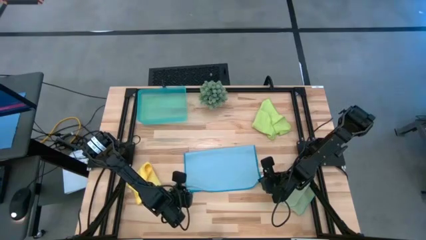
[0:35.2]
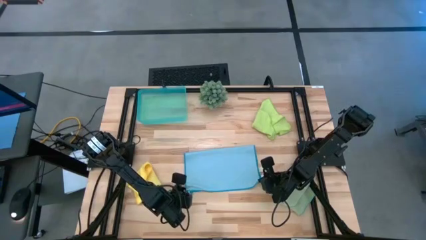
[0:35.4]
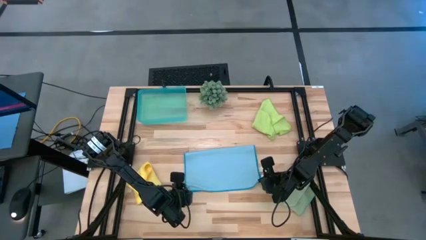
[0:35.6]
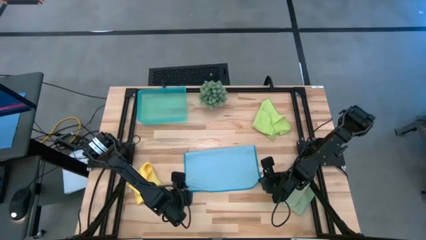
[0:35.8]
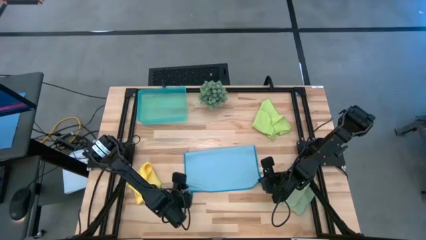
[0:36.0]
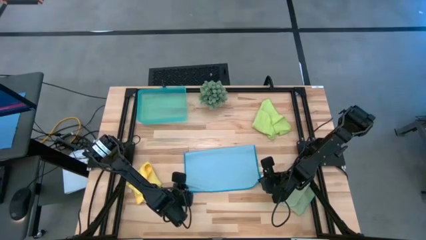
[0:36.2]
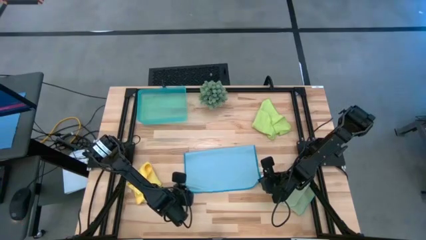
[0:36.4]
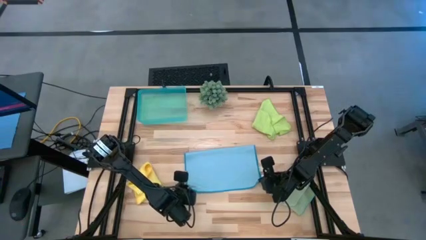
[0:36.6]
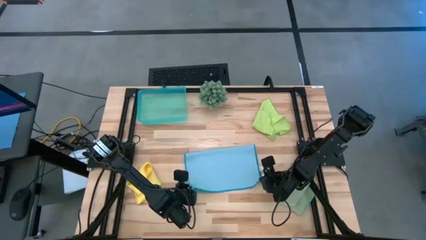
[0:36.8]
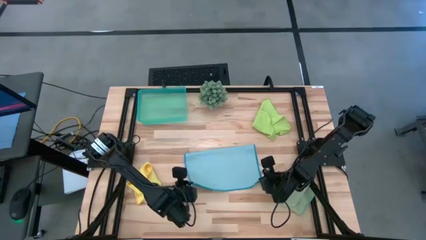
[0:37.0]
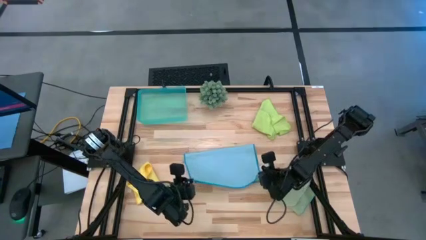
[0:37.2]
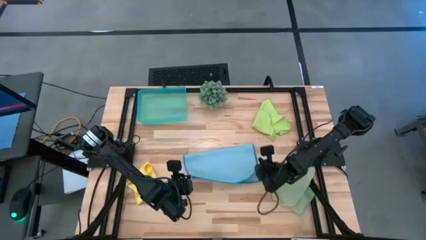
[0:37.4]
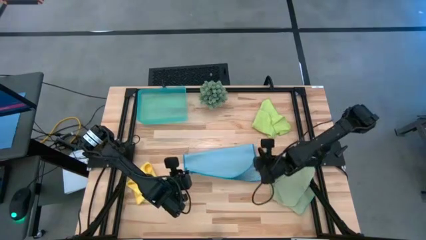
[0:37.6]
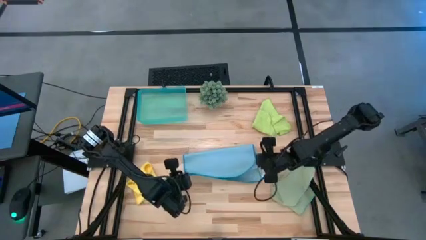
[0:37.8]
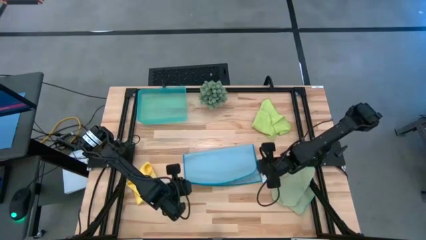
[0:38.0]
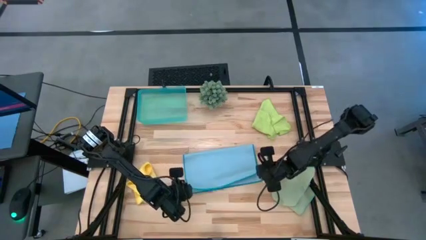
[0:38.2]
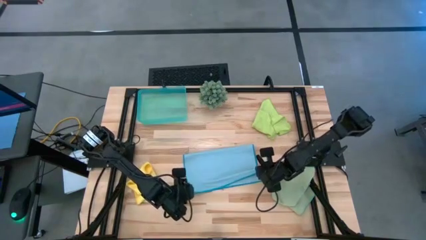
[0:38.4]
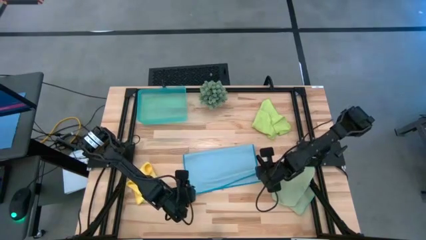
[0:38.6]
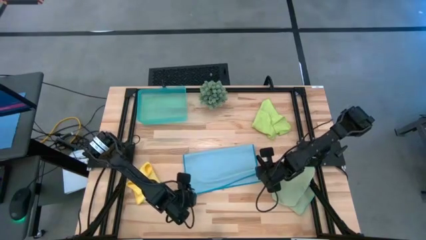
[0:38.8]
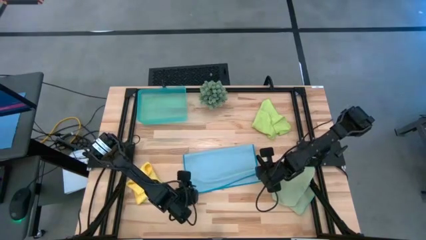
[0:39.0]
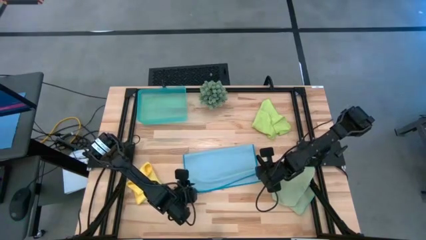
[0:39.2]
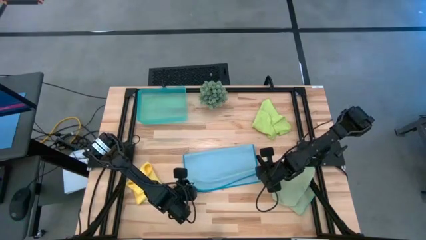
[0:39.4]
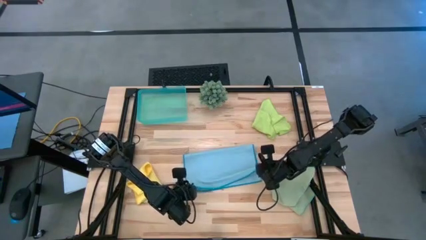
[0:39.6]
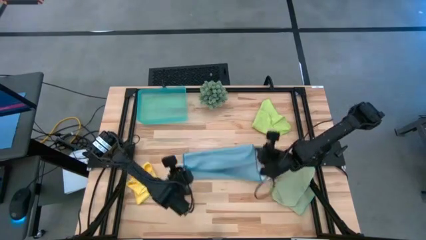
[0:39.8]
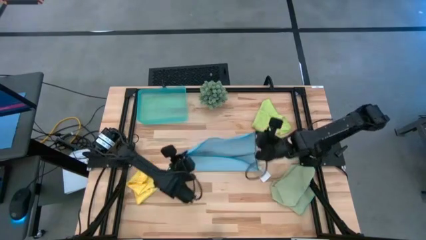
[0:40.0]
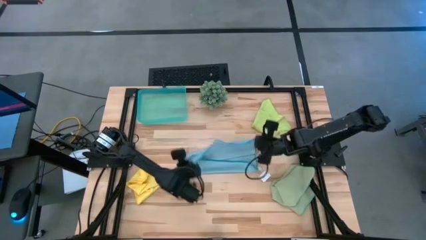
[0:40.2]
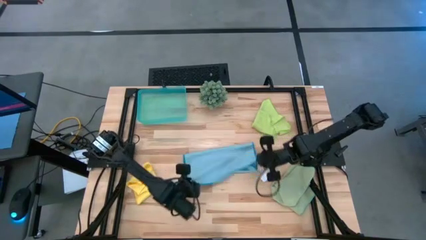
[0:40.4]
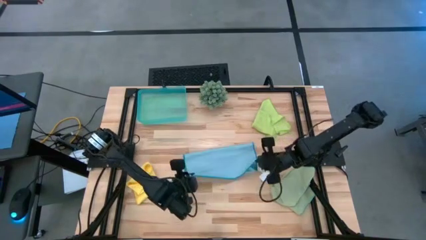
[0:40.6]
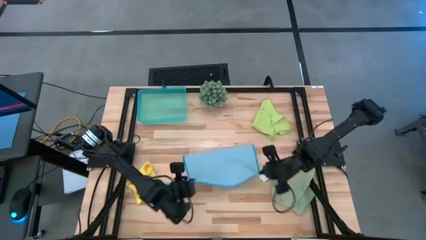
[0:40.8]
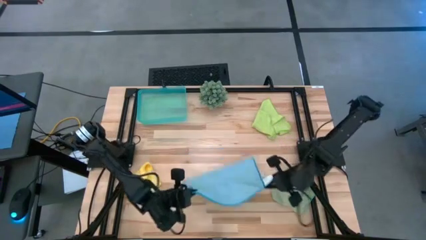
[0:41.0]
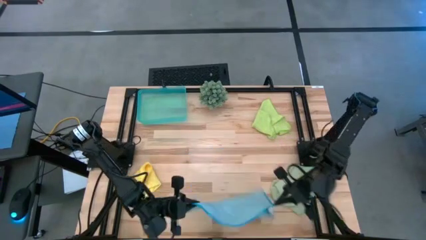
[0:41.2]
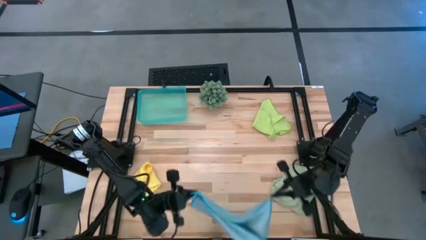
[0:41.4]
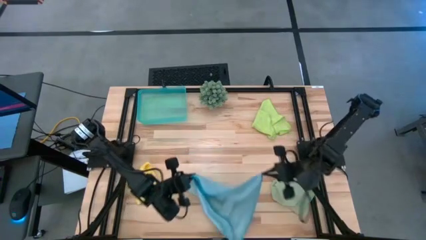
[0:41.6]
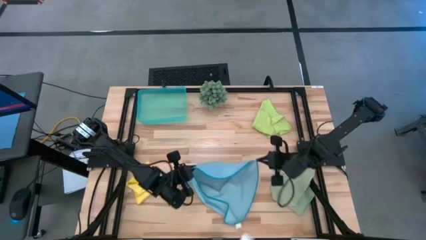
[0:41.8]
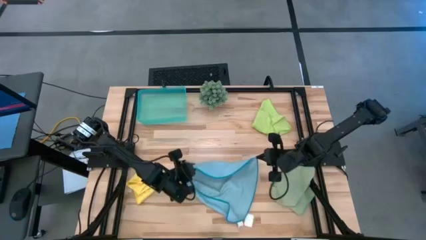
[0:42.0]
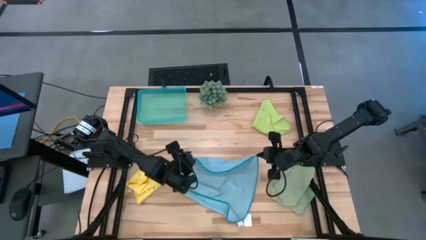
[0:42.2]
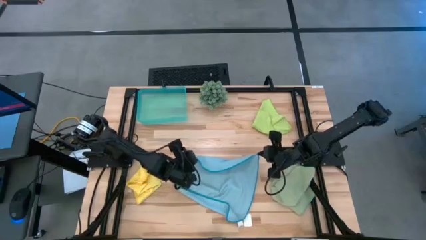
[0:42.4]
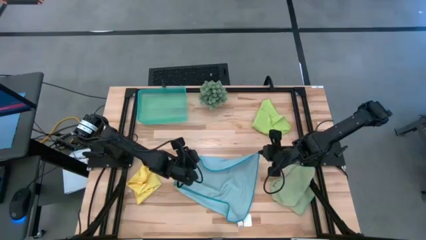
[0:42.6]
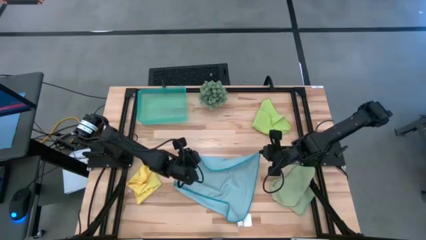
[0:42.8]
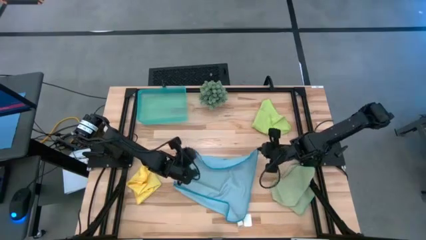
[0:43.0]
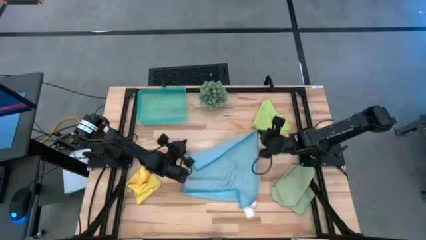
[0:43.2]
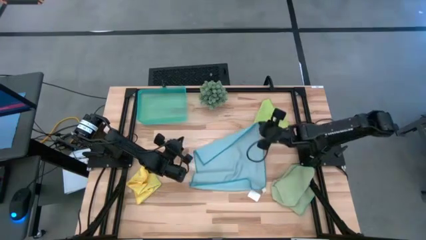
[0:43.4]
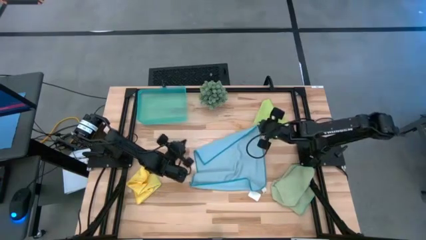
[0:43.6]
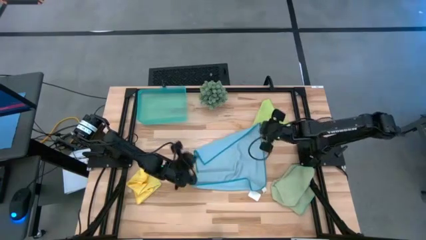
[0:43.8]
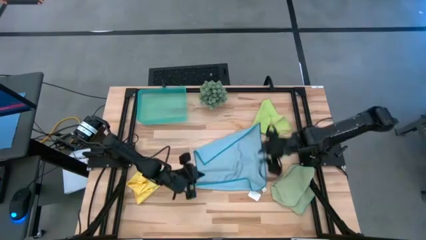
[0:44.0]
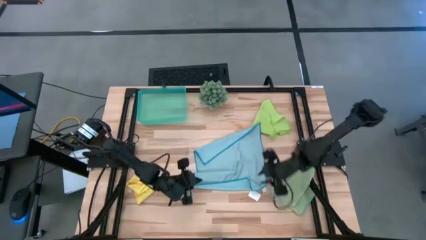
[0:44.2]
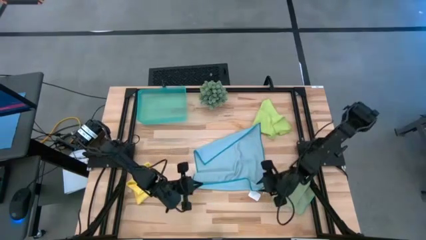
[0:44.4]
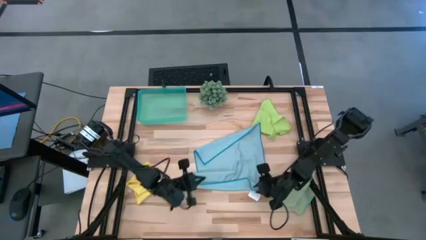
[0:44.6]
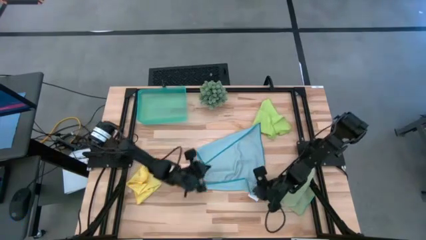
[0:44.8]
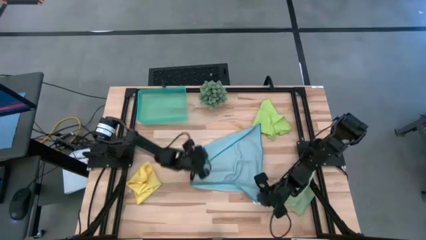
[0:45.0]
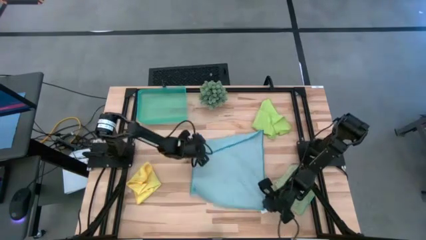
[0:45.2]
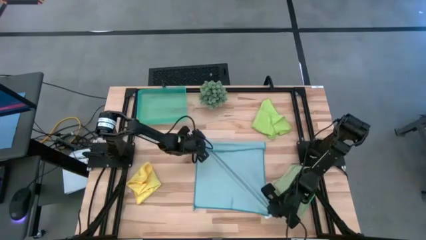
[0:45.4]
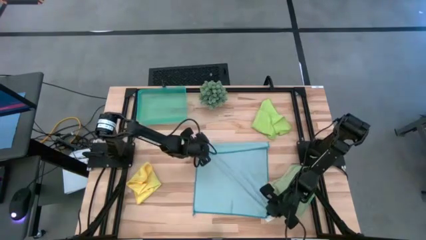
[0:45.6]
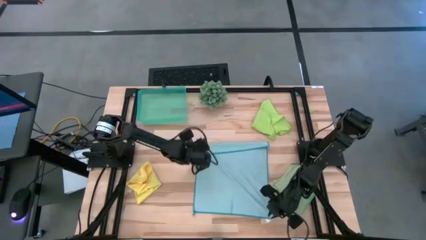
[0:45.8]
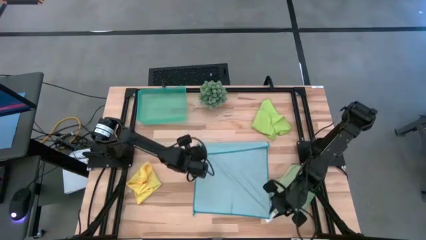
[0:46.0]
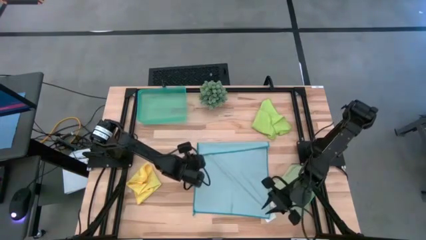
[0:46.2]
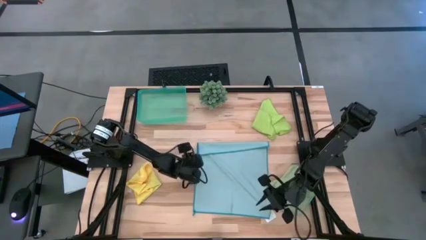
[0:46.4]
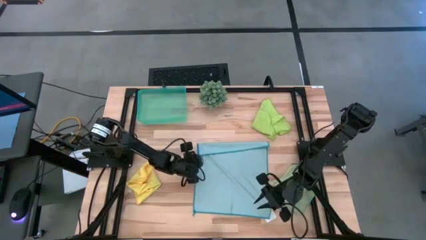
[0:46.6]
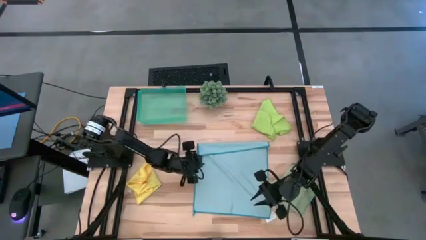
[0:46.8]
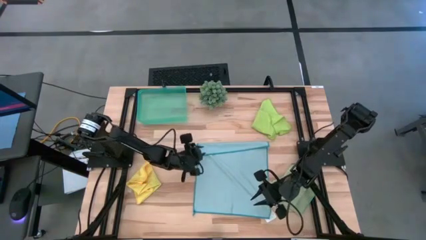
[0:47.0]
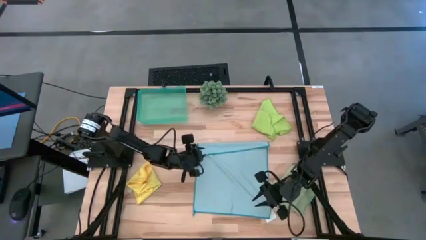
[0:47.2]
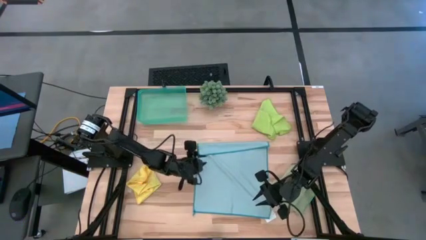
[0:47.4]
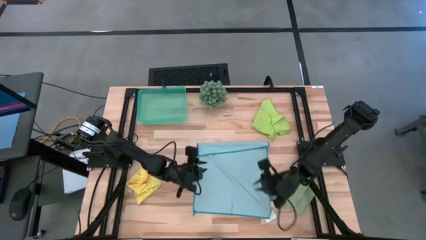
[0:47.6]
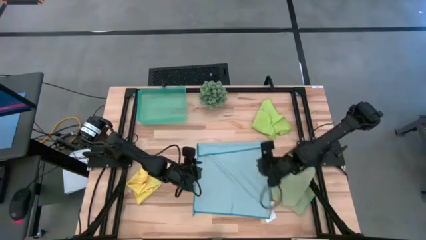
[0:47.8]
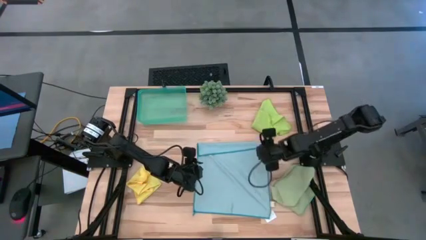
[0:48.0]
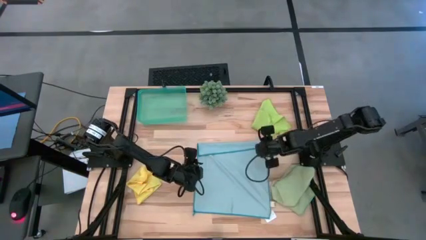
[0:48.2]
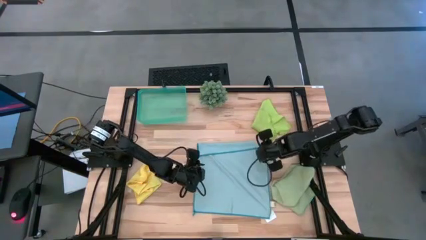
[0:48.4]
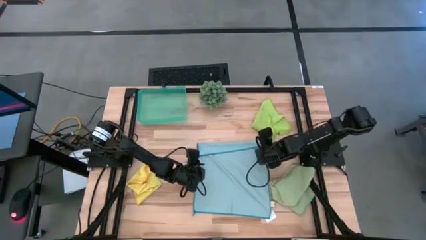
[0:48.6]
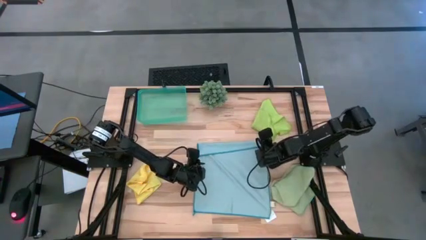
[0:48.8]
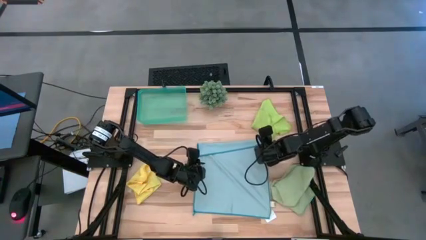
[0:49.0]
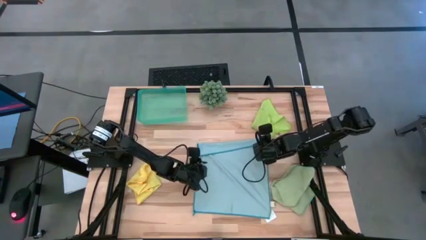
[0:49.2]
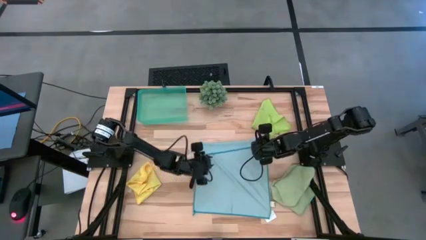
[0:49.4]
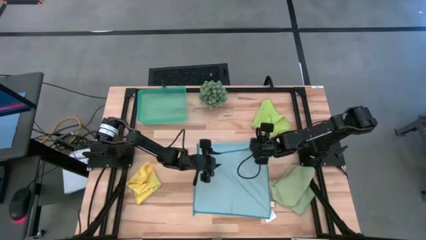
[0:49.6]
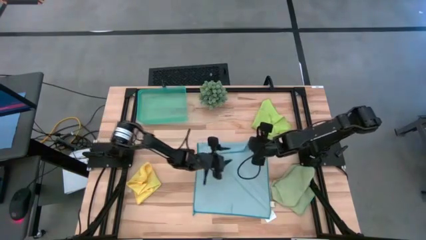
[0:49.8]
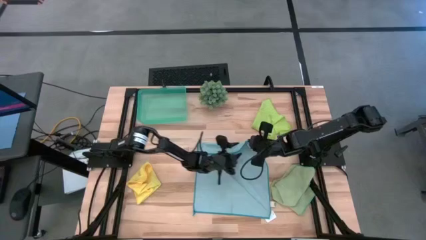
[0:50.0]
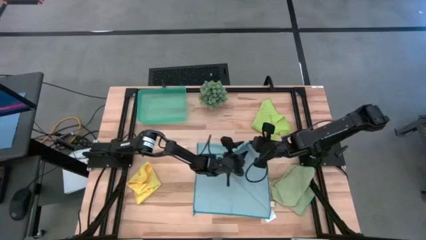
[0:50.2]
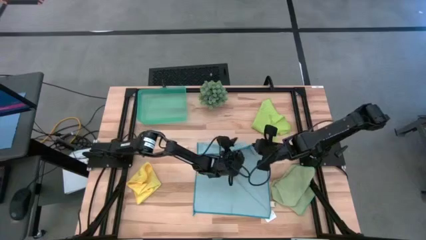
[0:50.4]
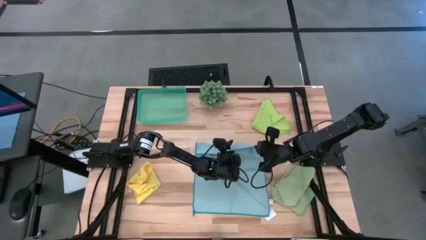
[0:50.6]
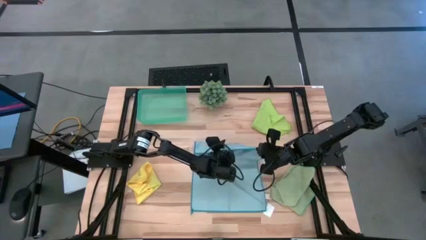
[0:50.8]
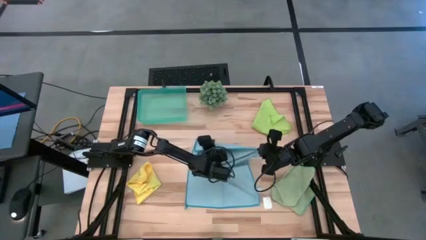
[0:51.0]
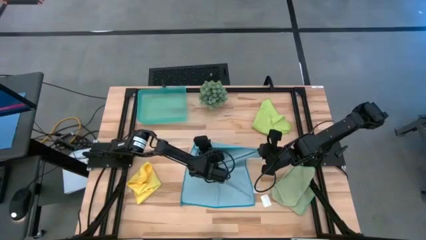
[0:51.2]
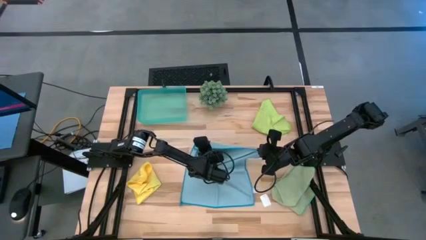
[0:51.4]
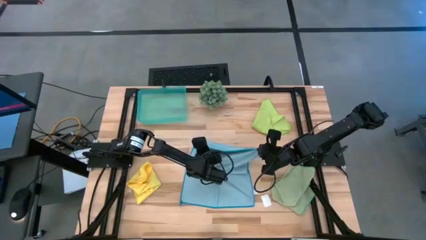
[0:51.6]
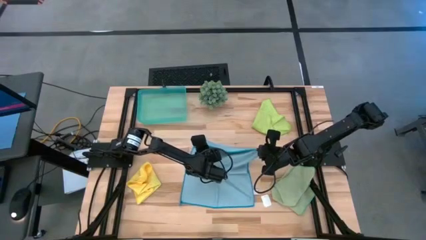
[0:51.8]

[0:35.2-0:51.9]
Task: Fold microfiber towels
Fold the blue microfiber cloth
